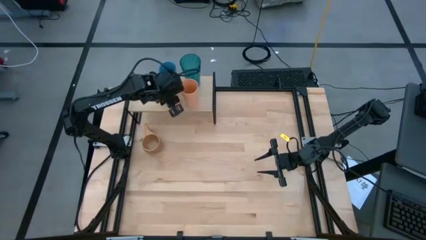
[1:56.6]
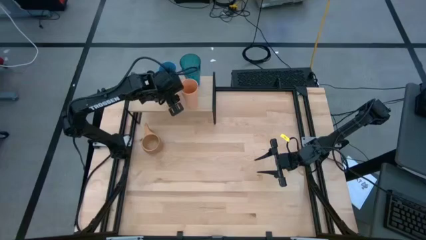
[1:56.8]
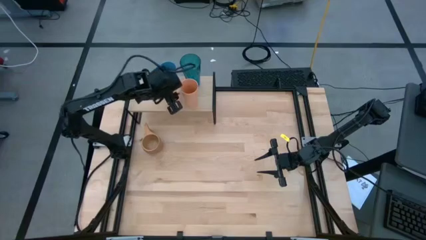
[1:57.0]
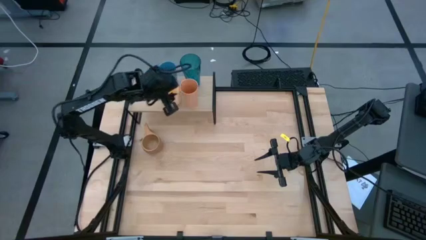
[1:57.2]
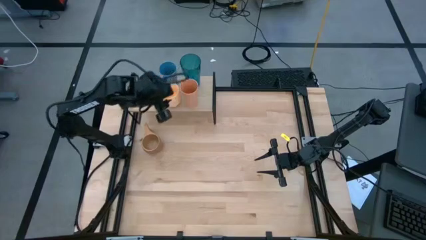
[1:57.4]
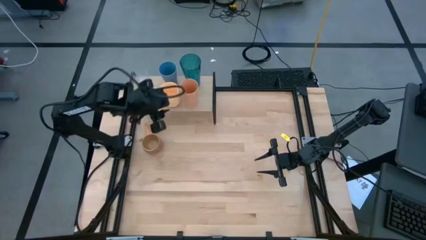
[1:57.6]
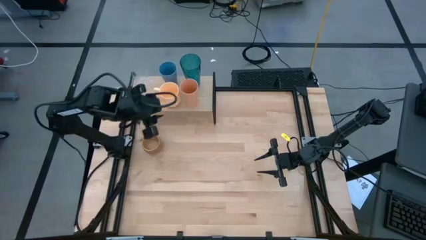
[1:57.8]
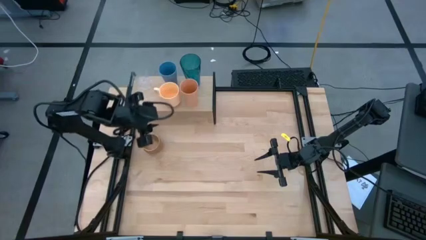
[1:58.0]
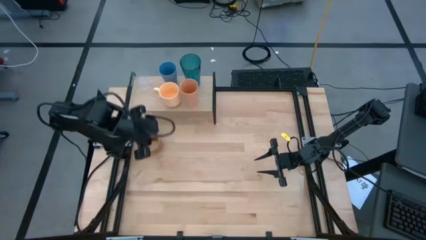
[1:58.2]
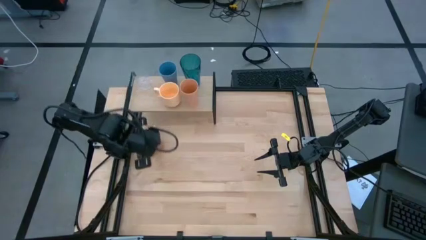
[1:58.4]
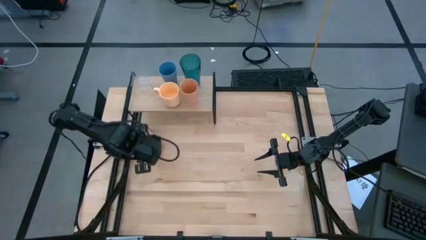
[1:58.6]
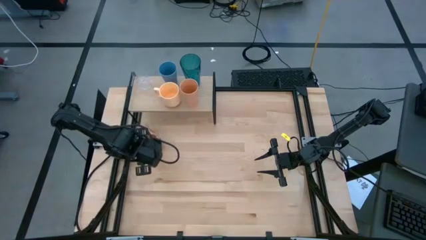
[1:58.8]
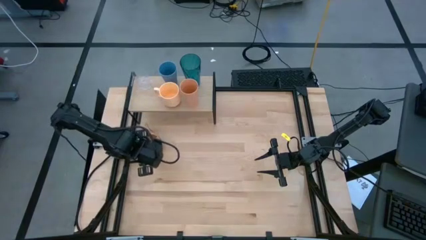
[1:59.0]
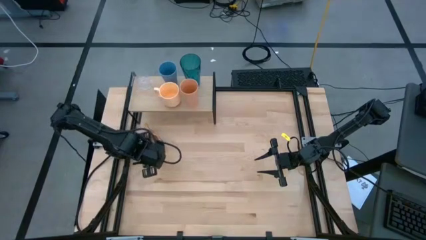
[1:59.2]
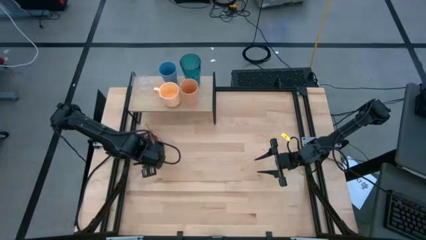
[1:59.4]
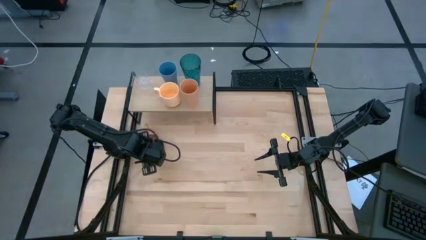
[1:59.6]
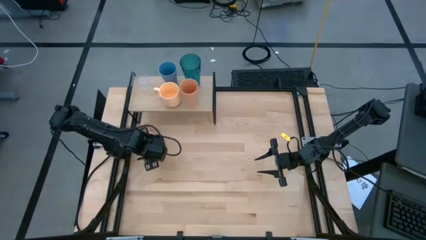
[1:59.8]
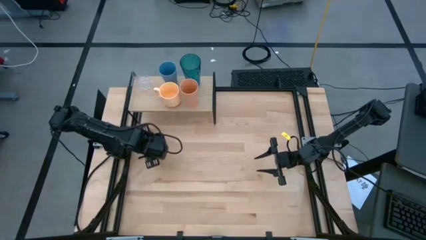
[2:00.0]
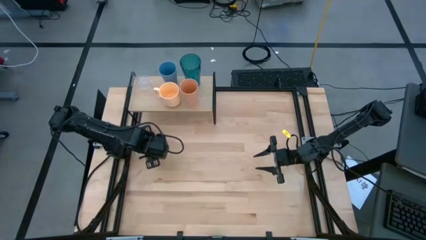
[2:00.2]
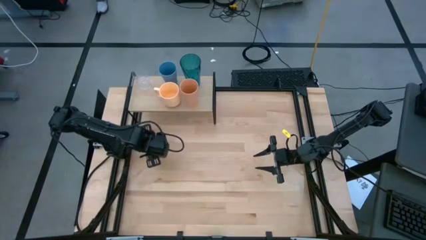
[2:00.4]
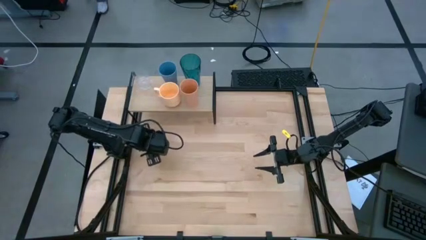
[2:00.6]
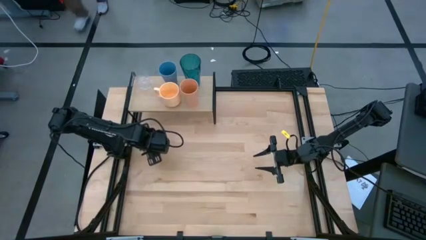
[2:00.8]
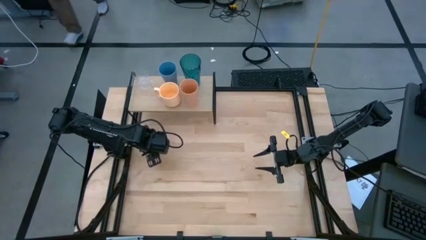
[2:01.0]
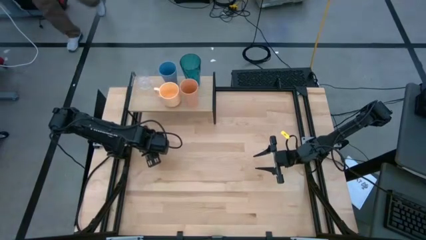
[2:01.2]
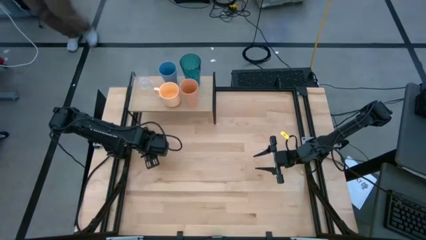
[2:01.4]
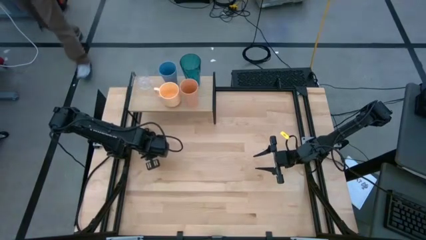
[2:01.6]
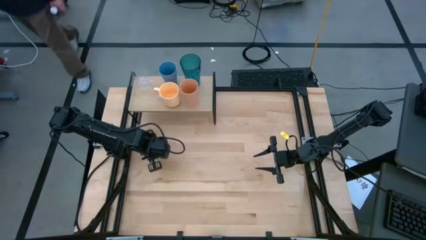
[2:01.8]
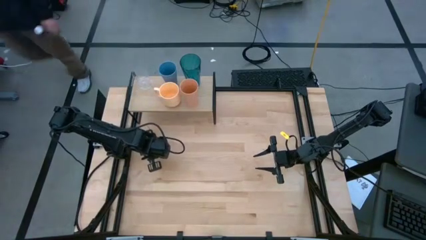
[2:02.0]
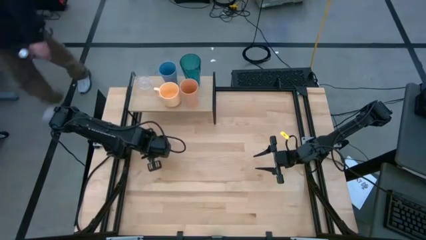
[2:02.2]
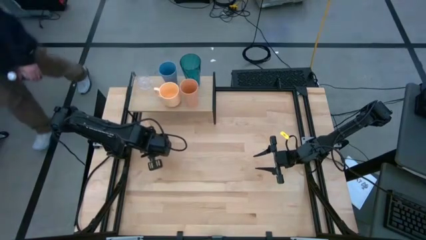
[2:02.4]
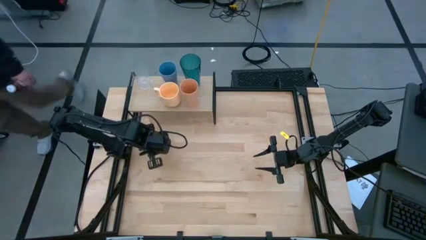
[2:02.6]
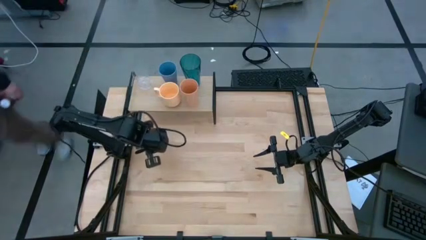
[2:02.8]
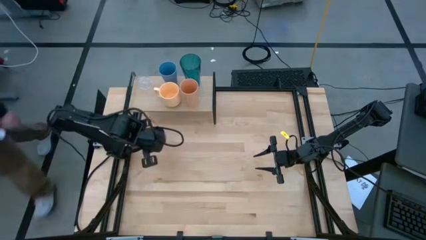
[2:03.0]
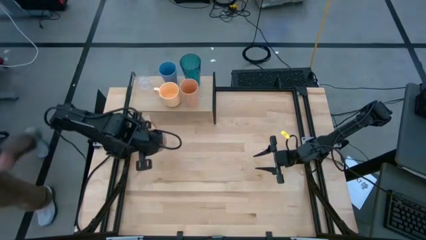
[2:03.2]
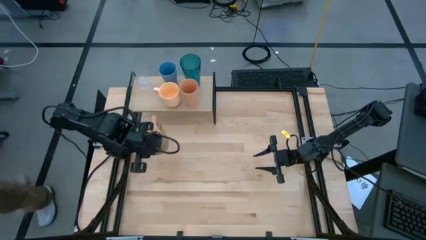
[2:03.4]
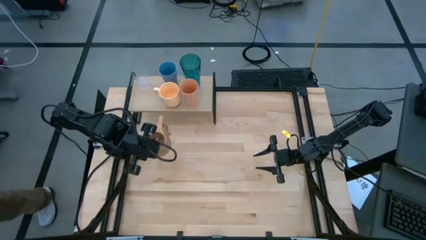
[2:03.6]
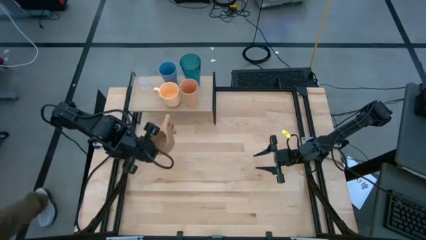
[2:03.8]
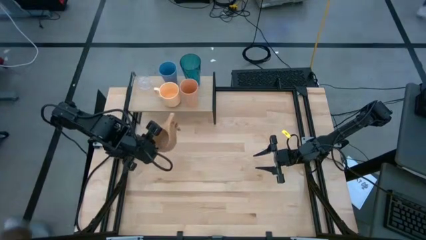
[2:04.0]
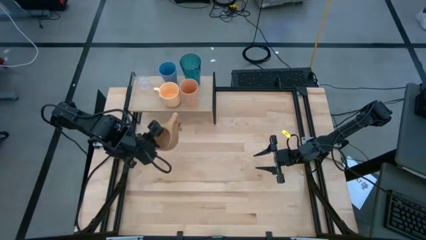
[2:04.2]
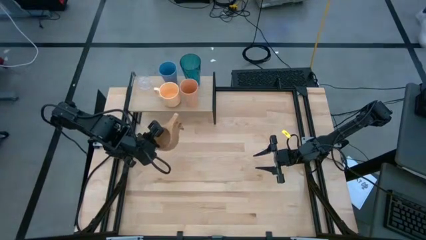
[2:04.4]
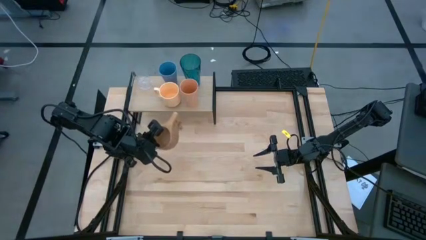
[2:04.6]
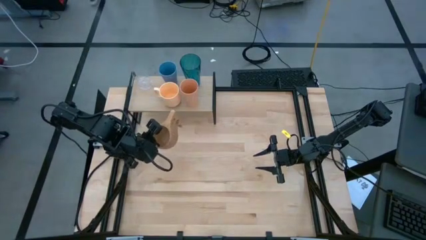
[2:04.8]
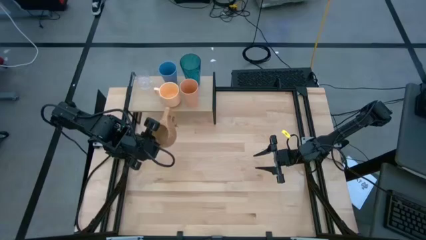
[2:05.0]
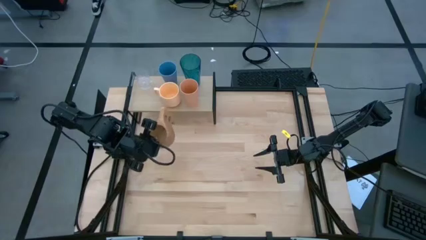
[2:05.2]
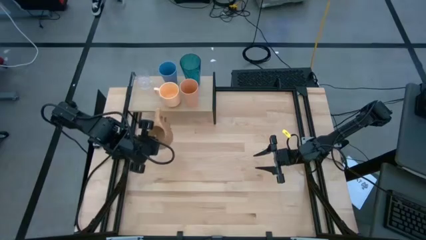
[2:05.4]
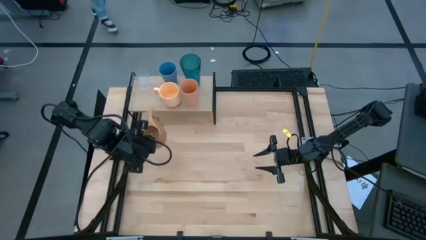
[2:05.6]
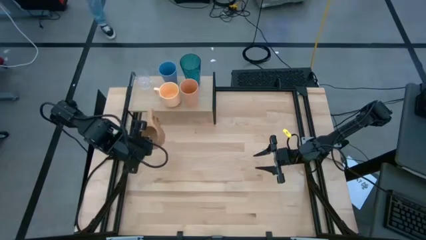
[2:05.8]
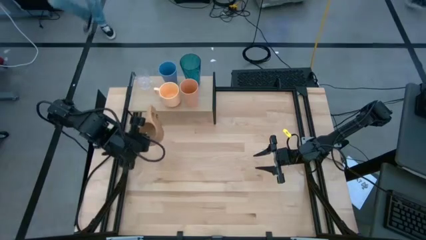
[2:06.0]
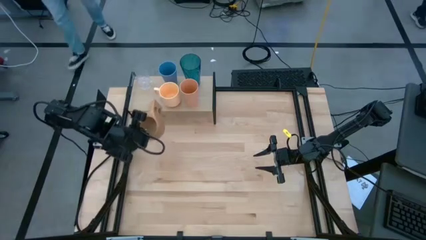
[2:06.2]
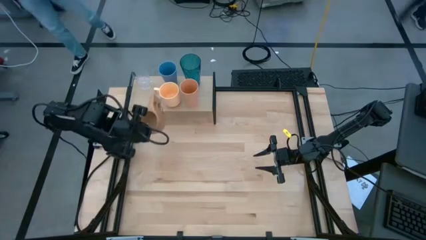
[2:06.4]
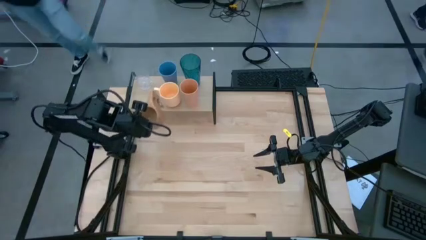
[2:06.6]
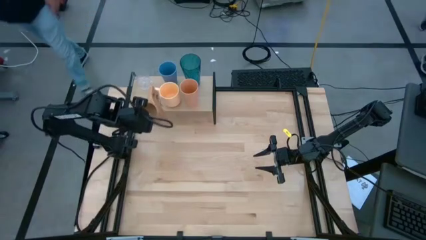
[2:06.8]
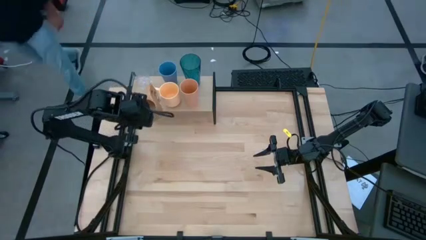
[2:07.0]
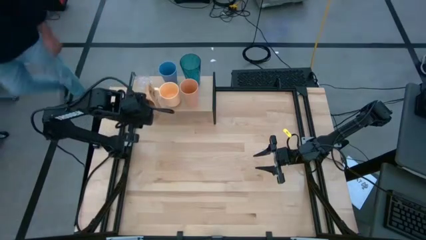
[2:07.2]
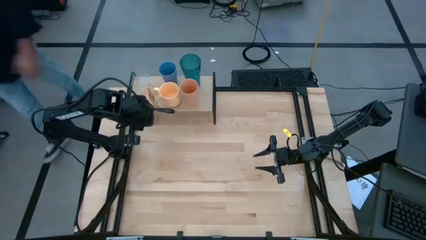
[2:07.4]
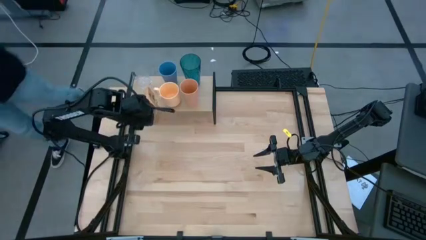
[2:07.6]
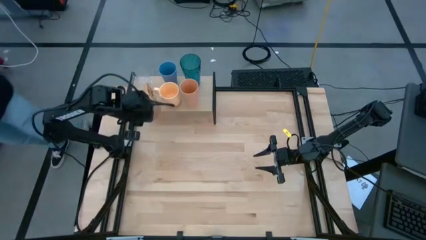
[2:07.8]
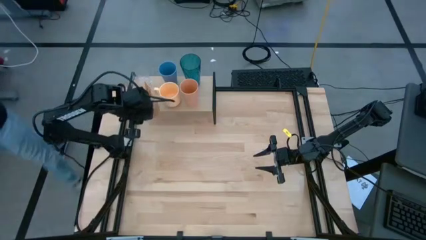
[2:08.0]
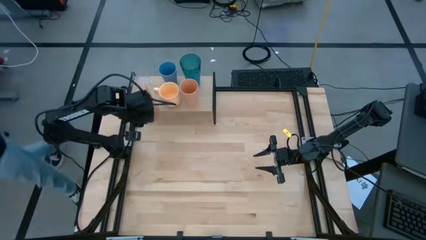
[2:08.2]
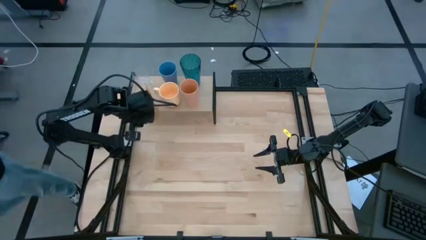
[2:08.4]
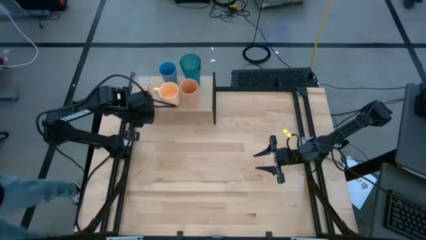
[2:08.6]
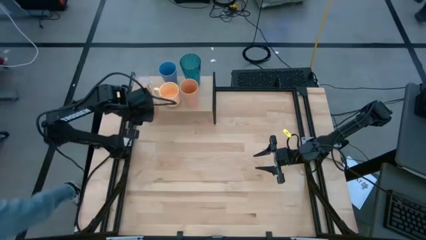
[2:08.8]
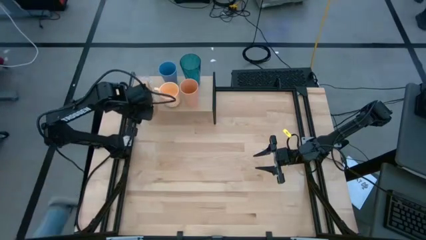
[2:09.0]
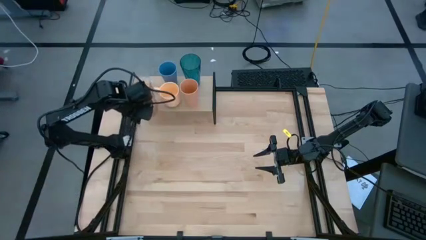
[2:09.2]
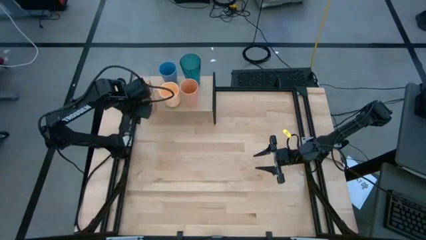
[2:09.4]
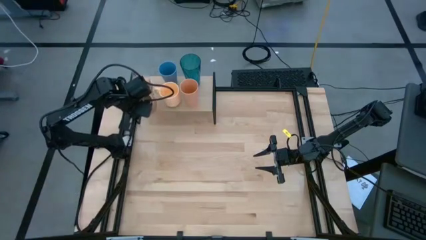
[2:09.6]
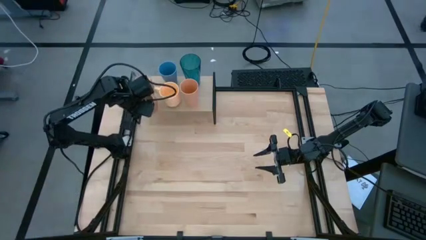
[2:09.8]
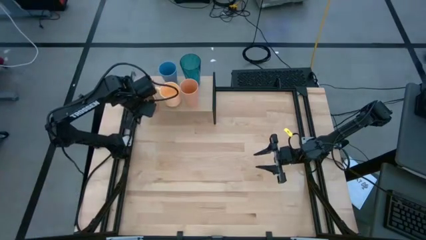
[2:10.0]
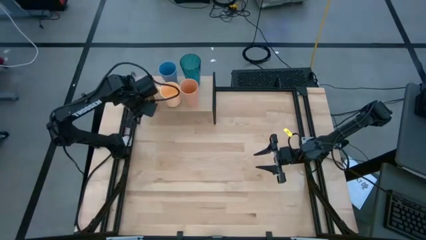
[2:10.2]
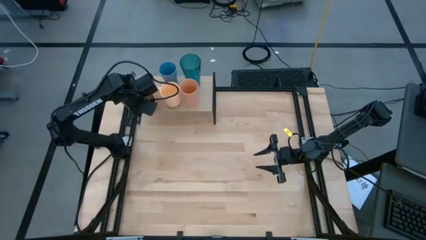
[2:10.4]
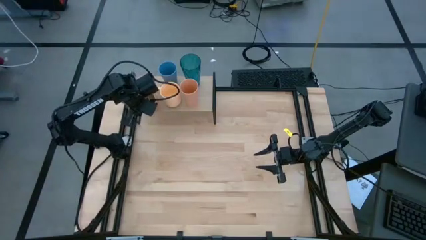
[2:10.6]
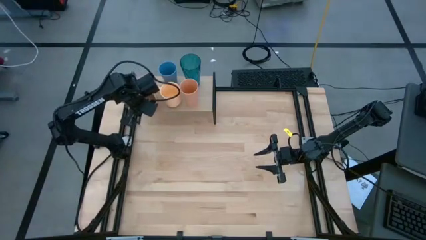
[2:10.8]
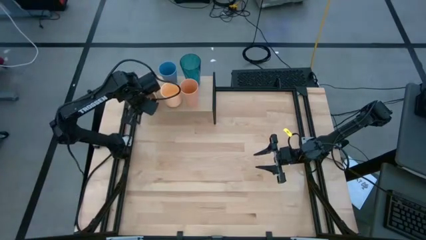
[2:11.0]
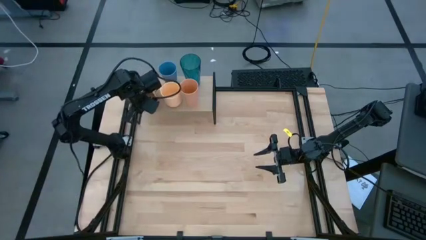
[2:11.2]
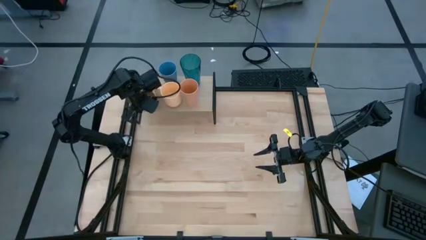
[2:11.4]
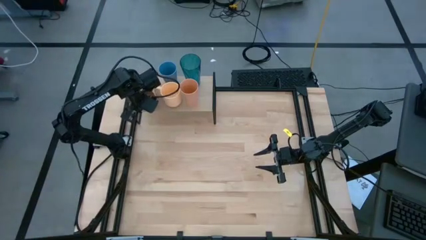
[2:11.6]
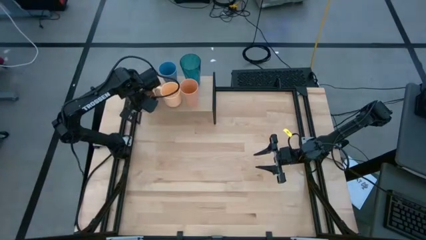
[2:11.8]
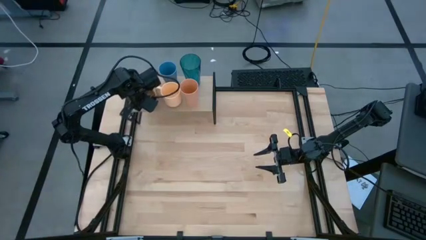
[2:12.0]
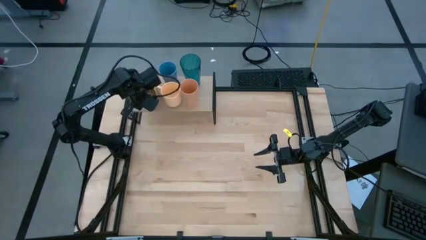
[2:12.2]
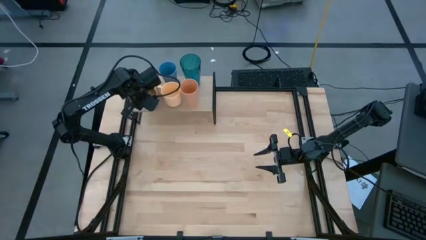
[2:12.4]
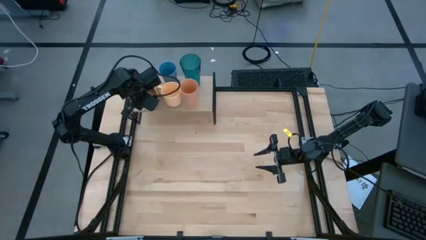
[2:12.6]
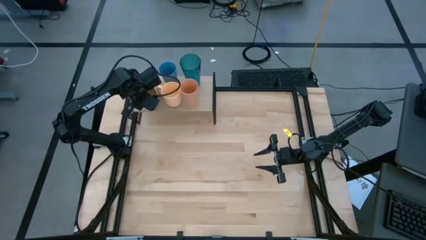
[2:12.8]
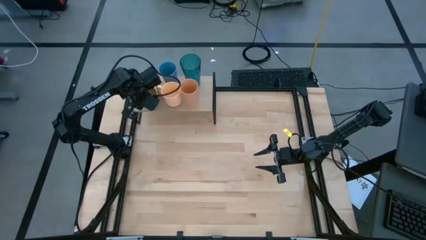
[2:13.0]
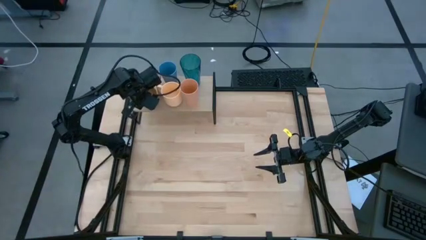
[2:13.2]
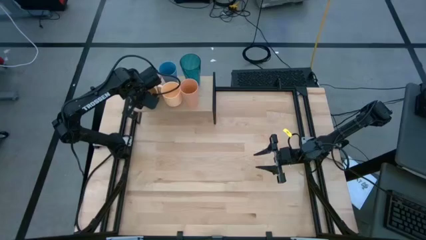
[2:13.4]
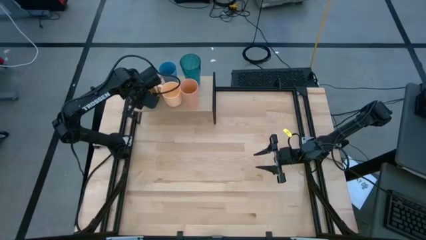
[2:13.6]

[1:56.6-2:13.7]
Task: Stack small to large cups/mugs on shelf
Put the wooden mug on the shelf
